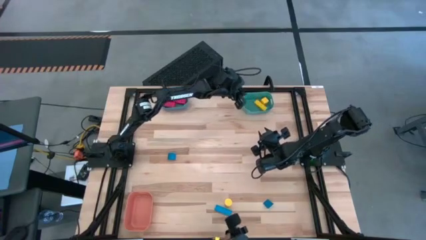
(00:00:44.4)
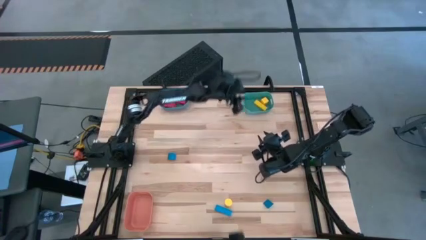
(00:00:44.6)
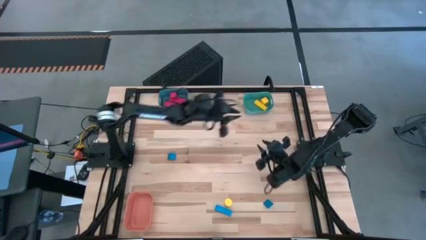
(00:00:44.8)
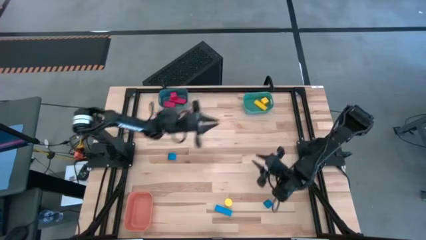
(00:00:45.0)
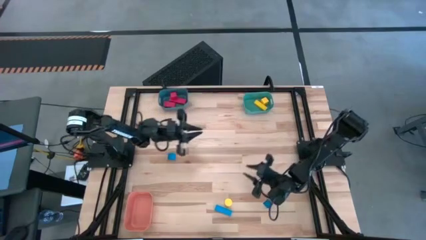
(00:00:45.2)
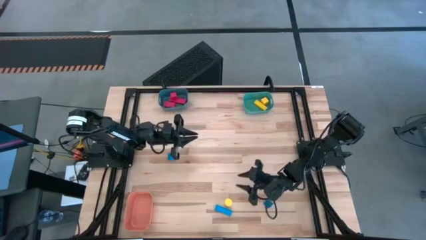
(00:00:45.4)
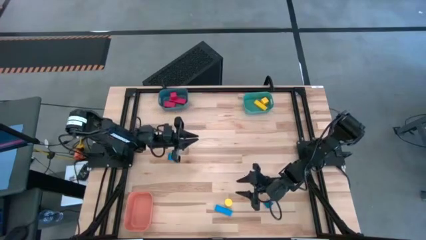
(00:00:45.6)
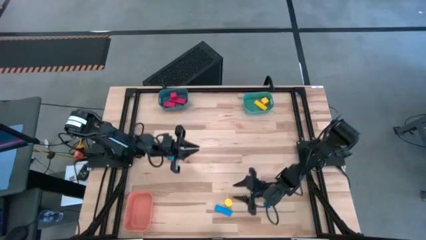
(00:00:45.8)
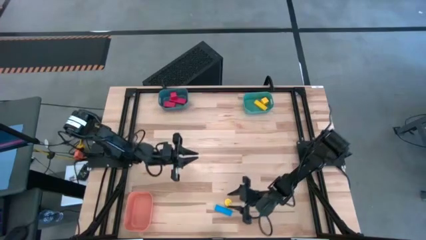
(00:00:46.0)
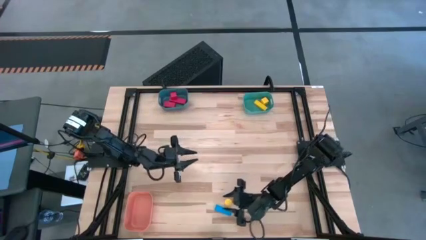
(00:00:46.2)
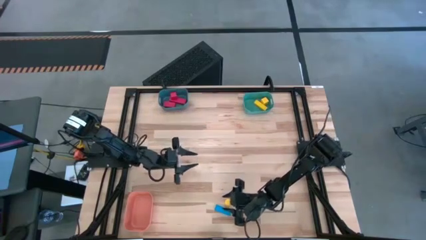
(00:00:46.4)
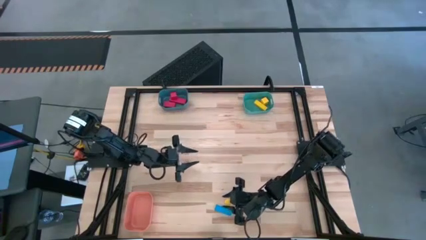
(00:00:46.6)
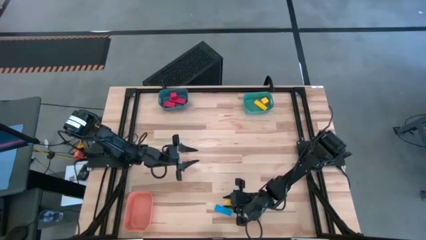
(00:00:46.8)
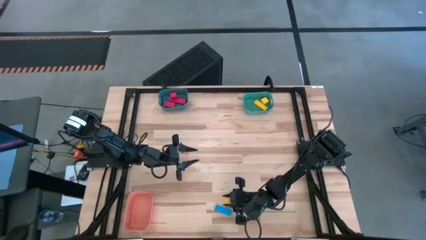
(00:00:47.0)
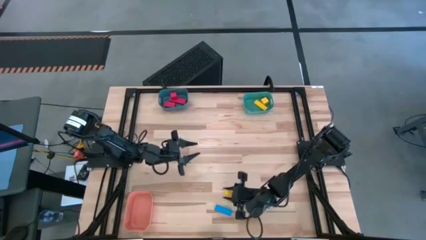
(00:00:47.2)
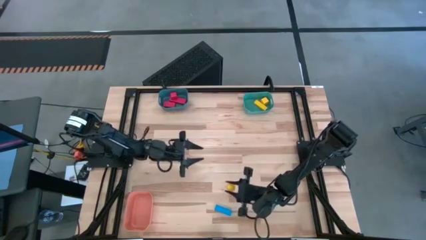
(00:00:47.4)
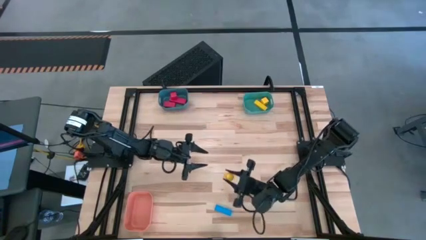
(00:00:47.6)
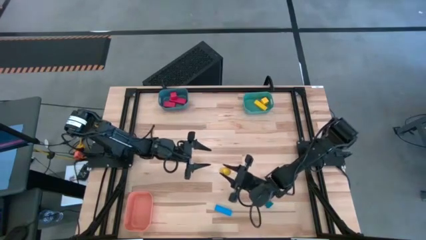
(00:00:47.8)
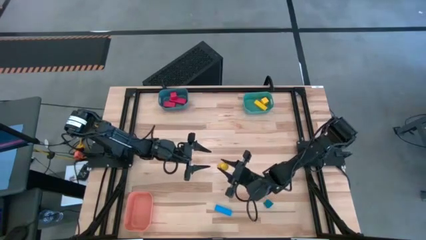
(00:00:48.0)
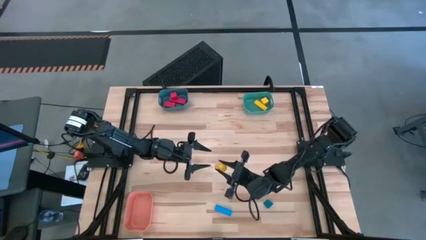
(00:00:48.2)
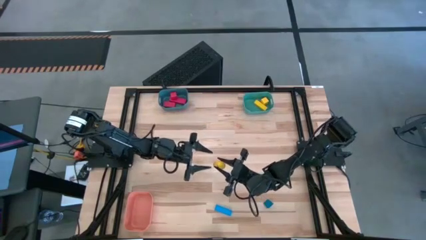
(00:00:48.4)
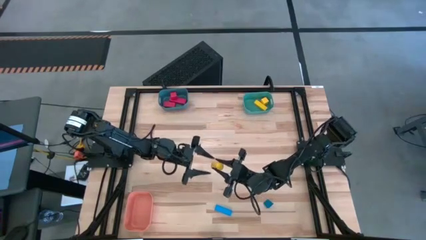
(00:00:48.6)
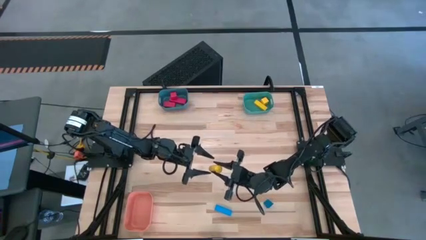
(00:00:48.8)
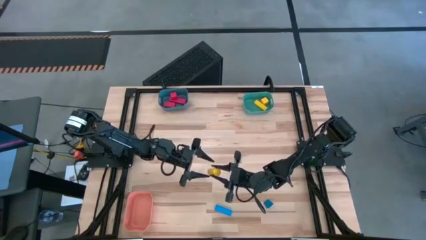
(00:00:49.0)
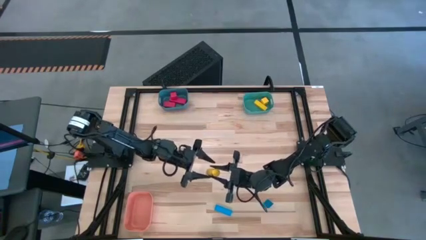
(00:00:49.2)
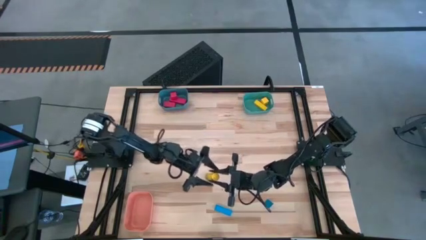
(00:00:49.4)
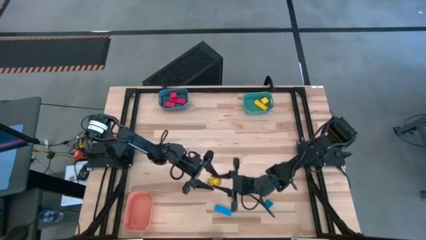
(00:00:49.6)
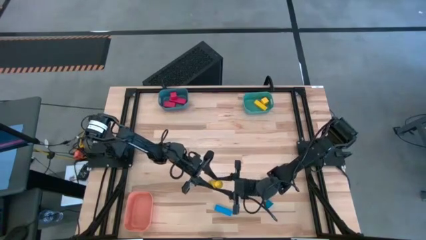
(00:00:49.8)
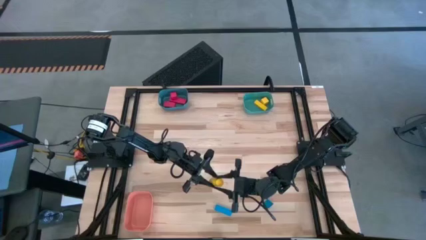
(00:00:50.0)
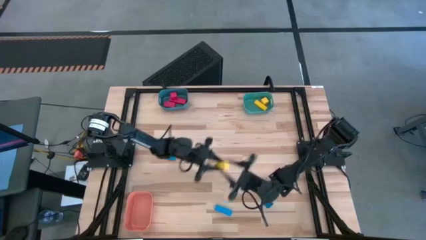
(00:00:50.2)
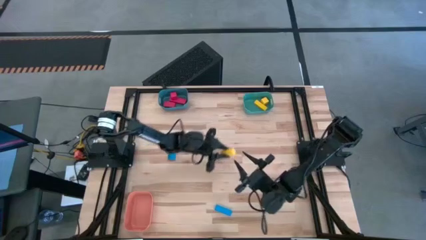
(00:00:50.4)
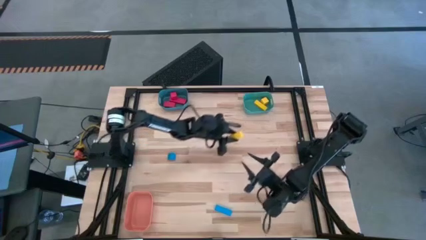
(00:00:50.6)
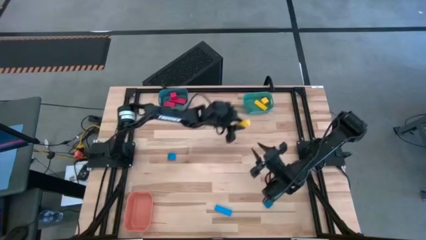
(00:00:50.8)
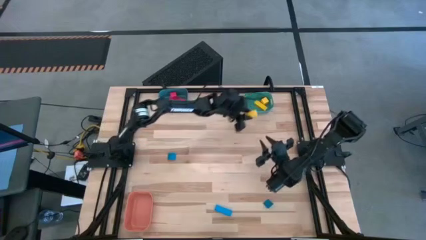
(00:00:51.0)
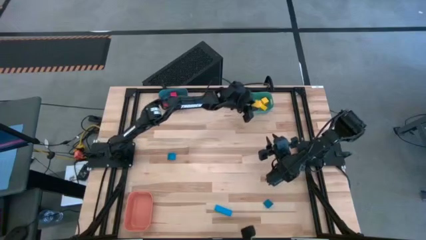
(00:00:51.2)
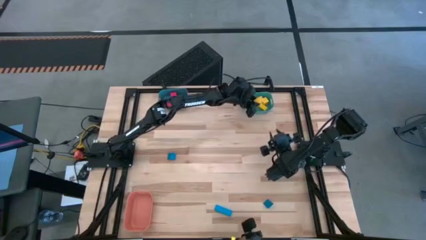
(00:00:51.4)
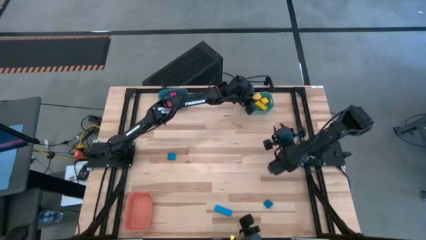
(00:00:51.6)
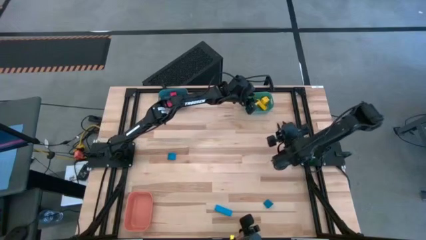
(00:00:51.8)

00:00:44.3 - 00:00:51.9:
Task: Sort & place blocks by color
Put the yellow block into the green bin

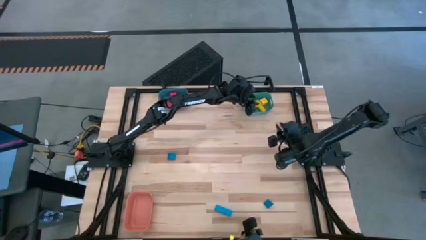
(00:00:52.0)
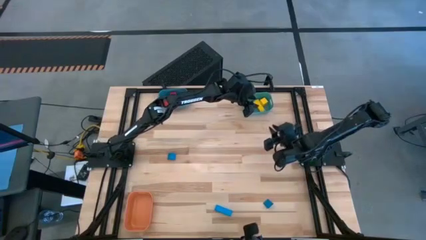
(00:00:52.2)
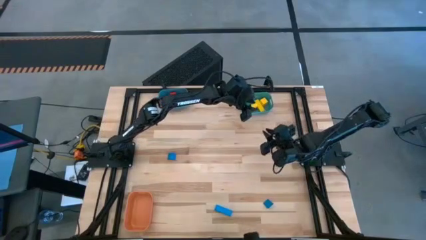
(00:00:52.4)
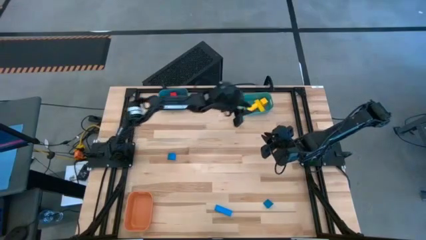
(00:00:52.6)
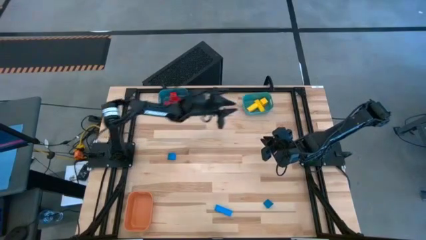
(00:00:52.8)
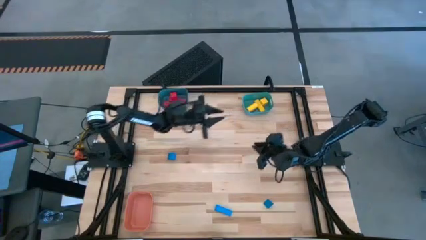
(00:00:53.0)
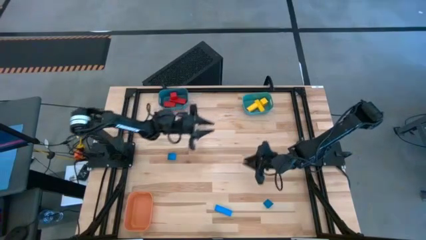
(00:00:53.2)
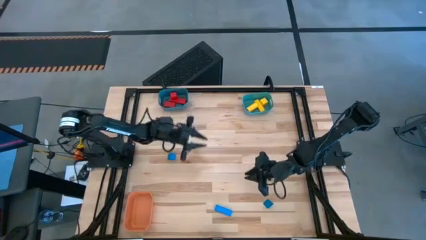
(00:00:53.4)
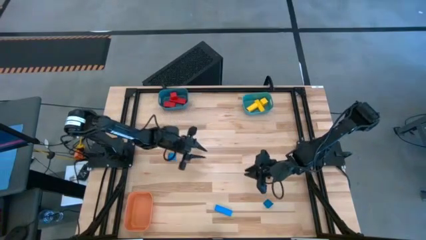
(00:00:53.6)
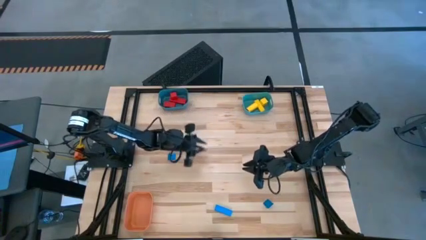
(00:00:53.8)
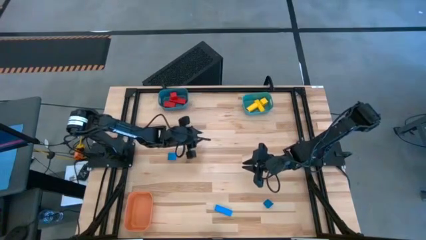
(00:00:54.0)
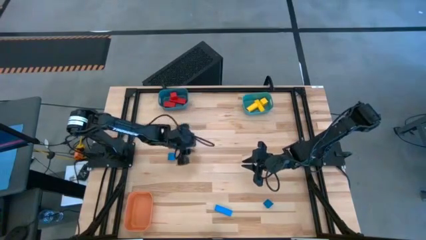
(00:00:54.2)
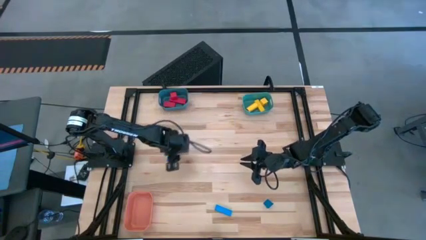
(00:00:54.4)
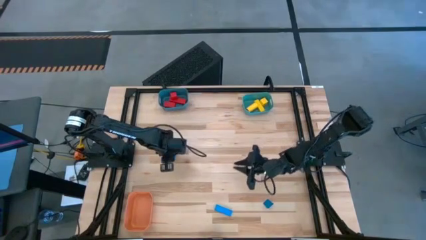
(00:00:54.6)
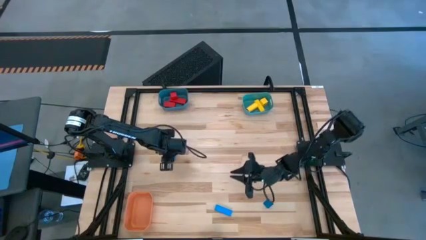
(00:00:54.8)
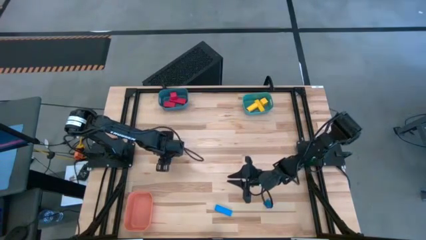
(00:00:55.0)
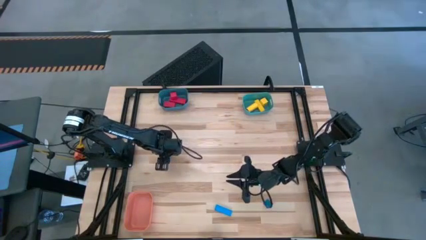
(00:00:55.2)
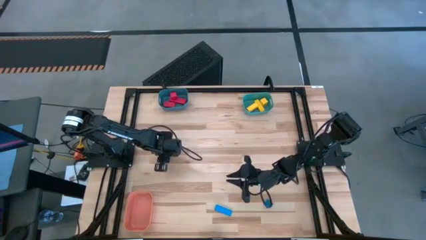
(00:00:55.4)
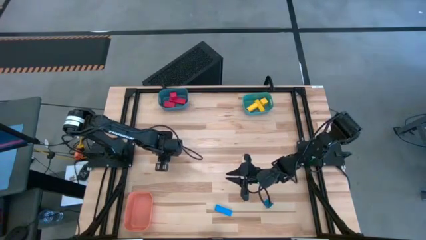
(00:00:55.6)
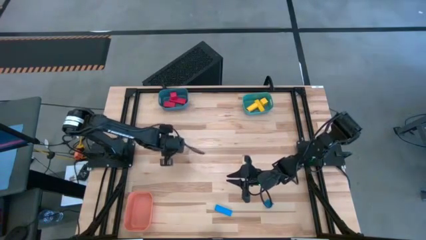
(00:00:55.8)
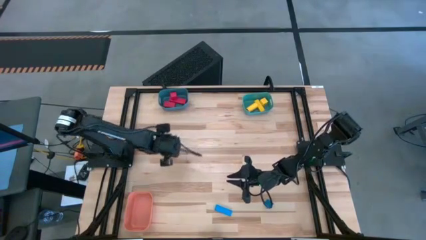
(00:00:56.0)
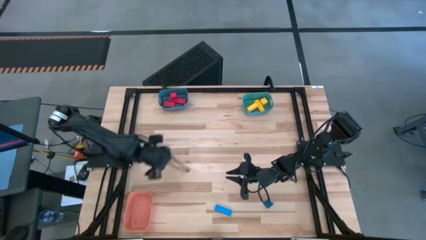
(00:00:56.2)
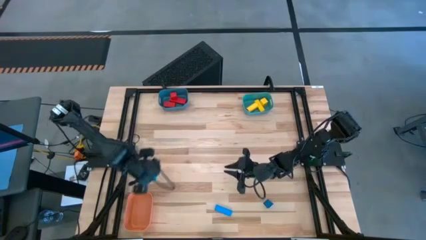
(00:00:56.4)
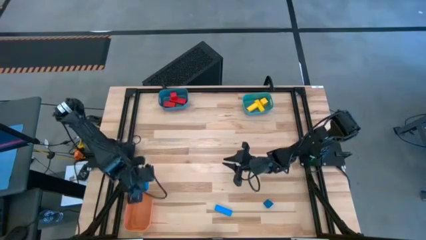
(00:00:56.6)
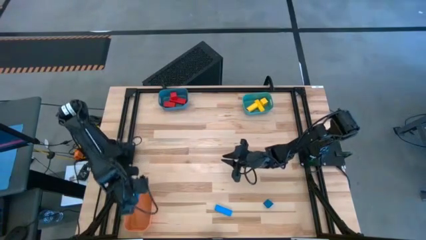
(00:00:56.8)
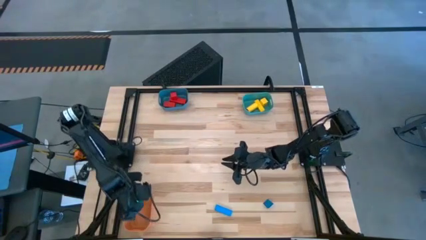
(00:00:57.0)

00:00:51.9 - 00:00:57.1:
Put the top blue block into the orange bin

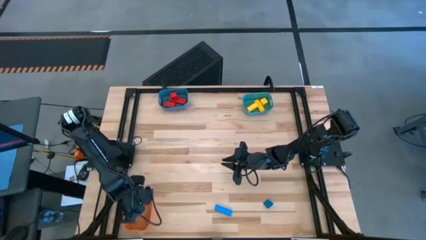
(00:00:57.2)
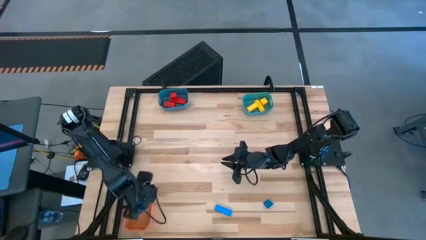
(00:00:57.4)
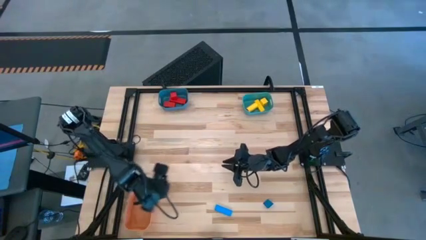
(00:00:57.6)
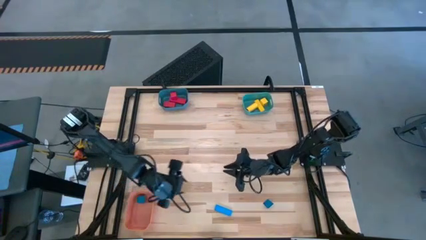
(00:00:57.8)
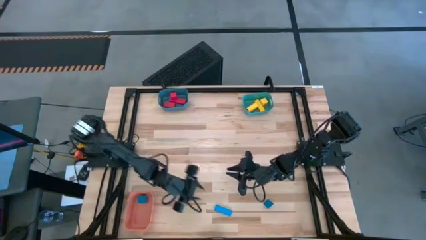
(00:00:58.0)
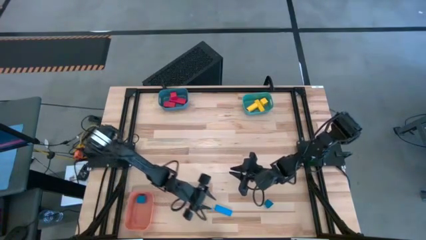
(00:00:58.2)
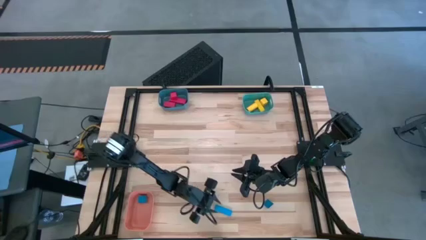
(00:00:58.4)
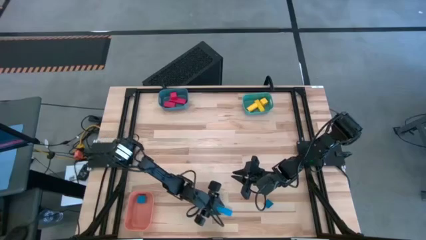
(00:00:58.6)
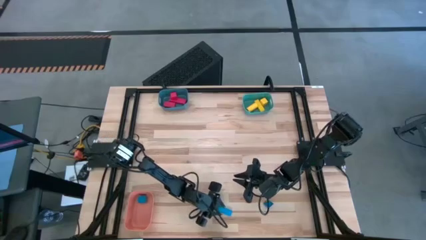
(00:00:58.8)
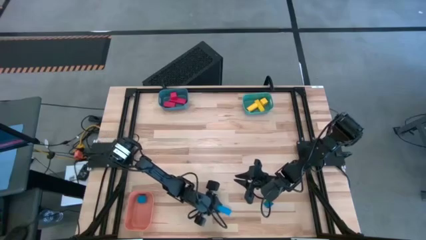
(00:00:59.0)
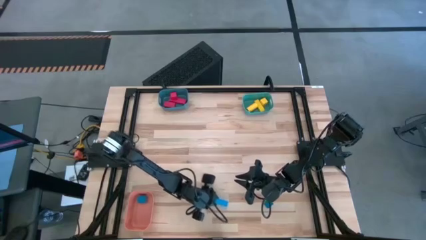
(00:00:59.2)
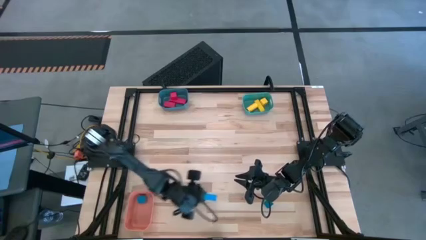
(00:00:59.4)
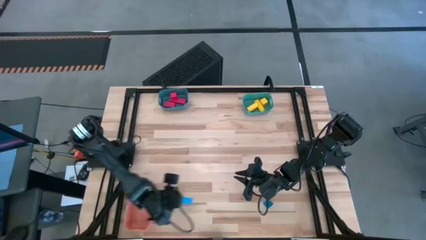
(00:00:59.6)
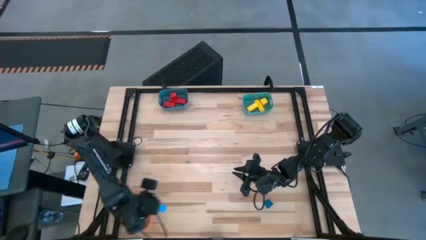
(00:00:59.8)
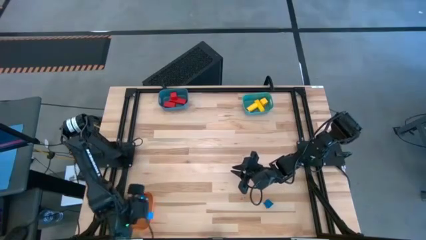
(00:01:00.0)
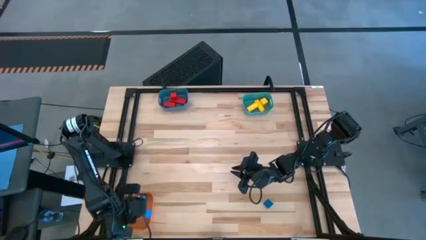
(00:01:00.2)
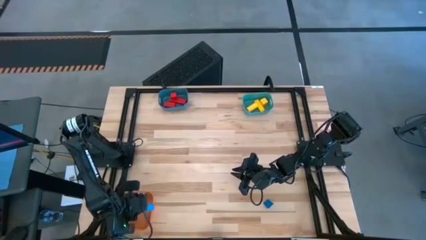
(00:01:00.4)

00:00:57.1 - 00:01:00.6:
Put the left blue block into the orange bin
